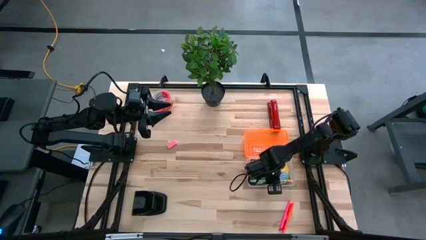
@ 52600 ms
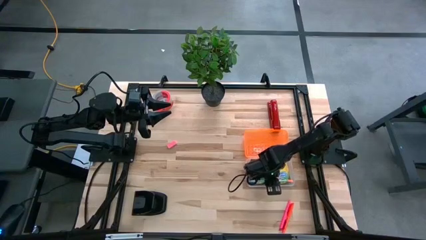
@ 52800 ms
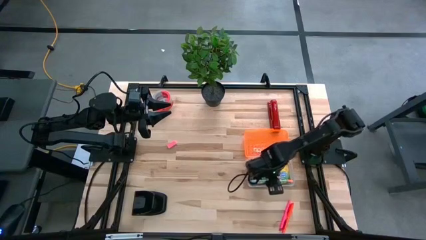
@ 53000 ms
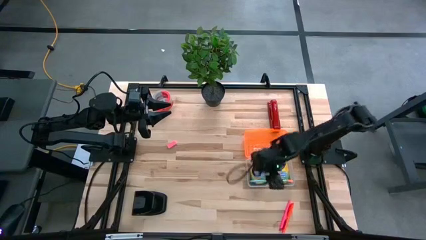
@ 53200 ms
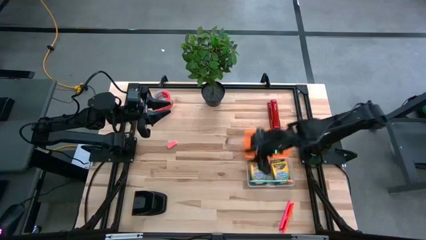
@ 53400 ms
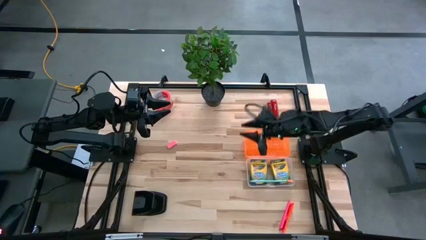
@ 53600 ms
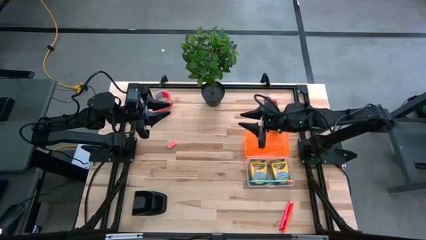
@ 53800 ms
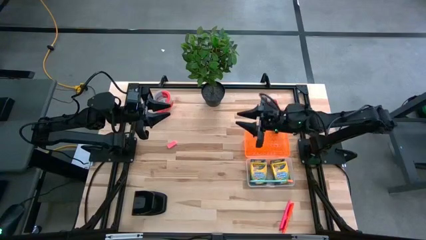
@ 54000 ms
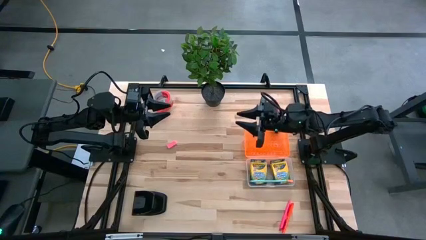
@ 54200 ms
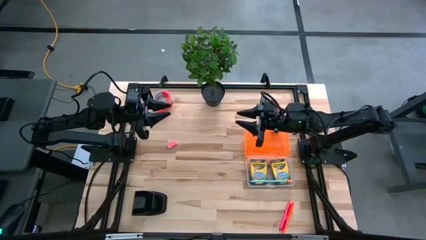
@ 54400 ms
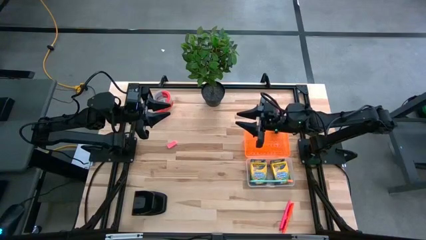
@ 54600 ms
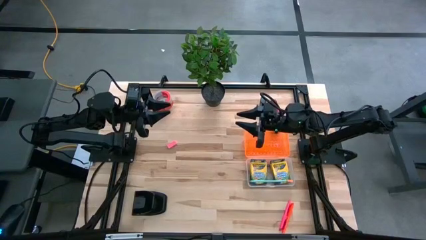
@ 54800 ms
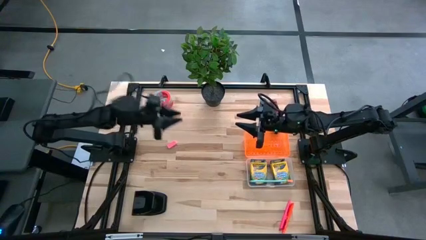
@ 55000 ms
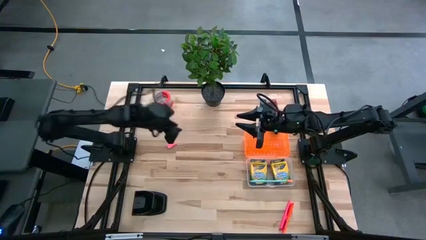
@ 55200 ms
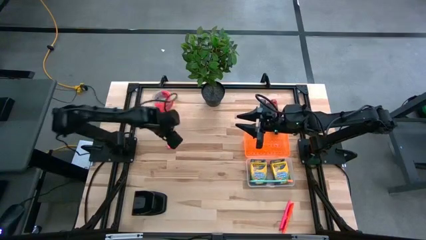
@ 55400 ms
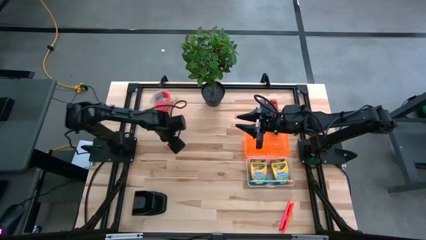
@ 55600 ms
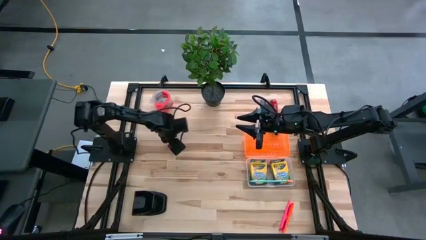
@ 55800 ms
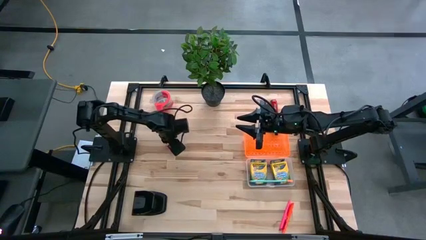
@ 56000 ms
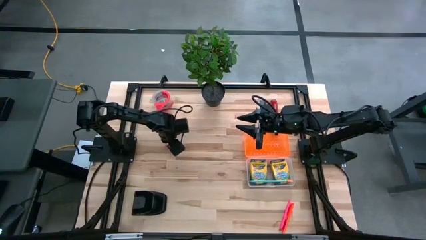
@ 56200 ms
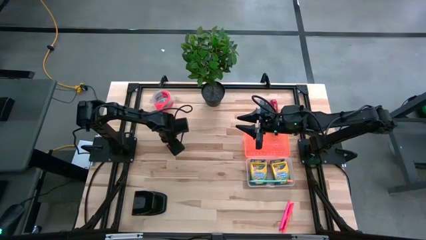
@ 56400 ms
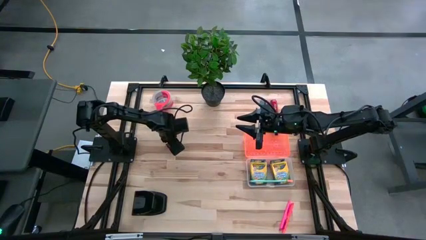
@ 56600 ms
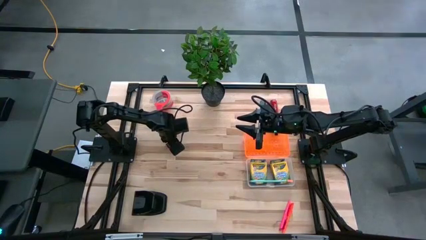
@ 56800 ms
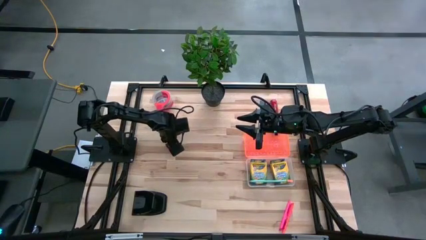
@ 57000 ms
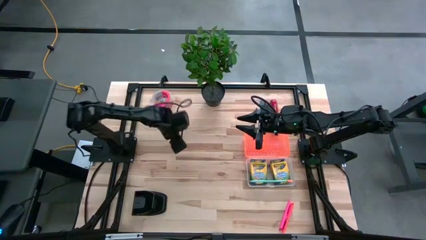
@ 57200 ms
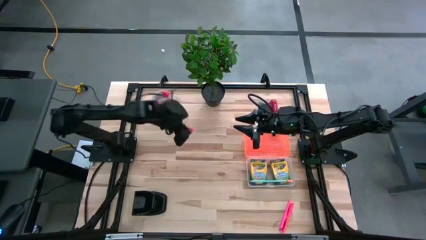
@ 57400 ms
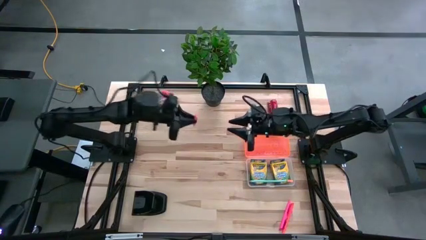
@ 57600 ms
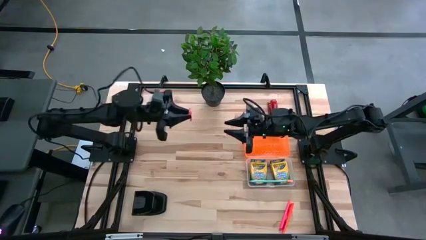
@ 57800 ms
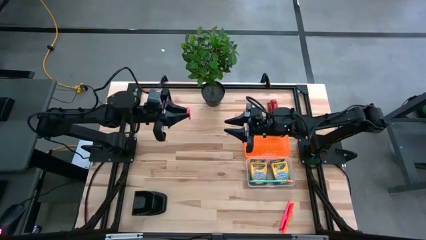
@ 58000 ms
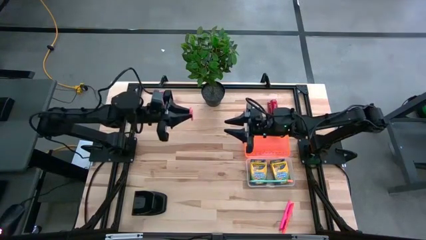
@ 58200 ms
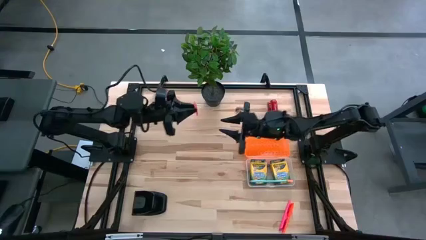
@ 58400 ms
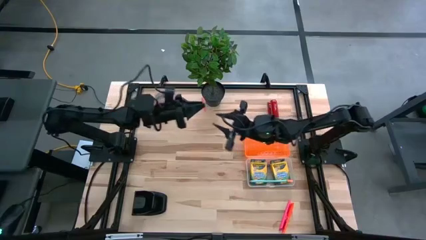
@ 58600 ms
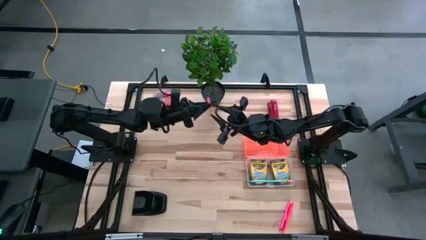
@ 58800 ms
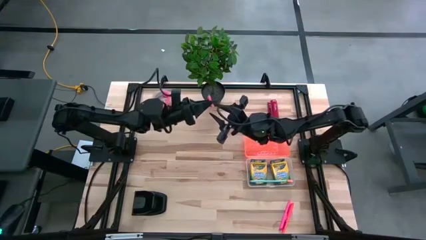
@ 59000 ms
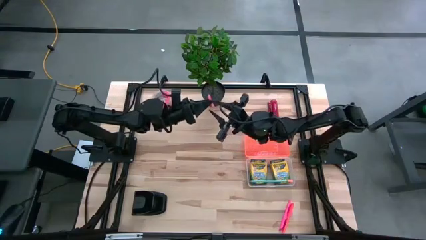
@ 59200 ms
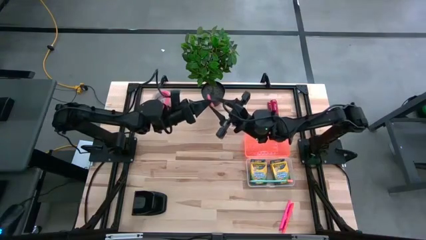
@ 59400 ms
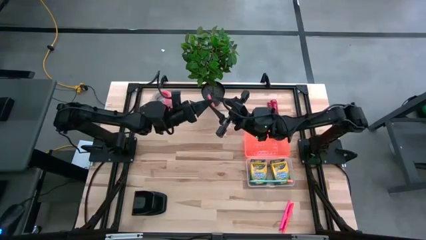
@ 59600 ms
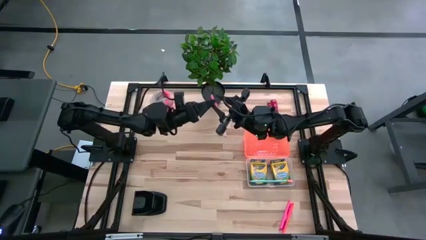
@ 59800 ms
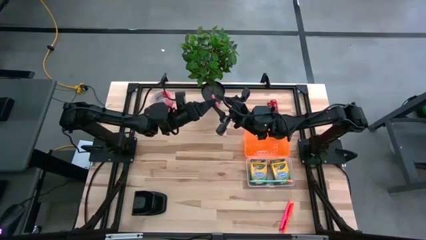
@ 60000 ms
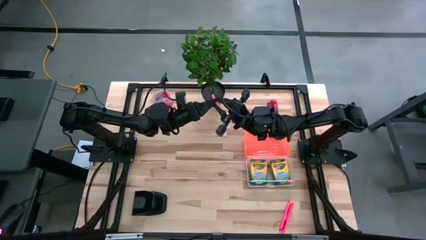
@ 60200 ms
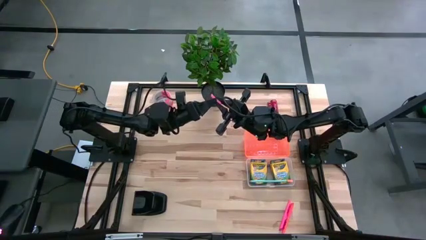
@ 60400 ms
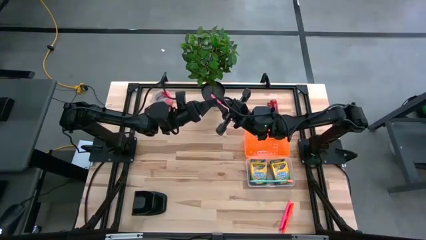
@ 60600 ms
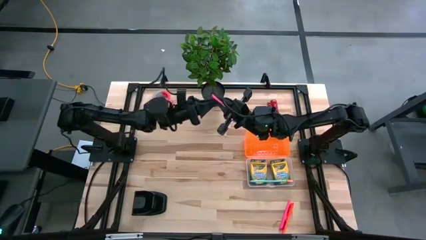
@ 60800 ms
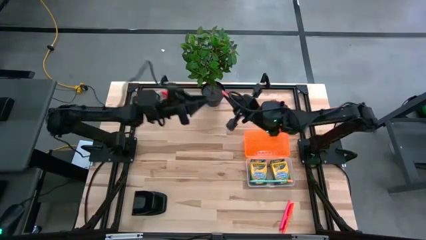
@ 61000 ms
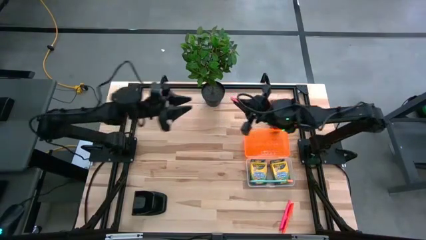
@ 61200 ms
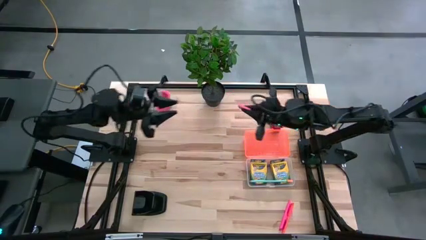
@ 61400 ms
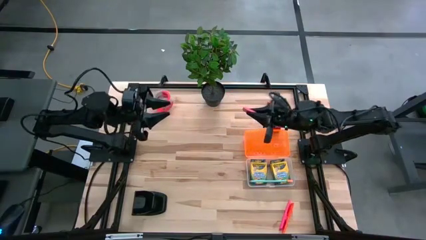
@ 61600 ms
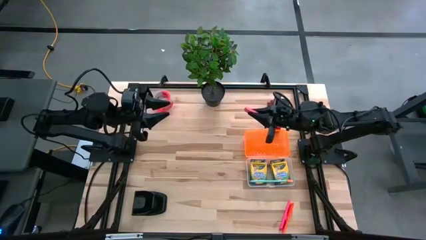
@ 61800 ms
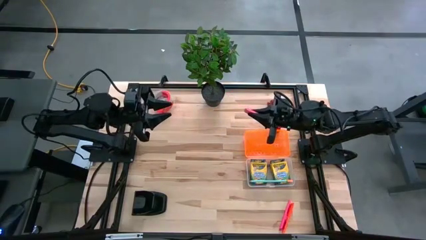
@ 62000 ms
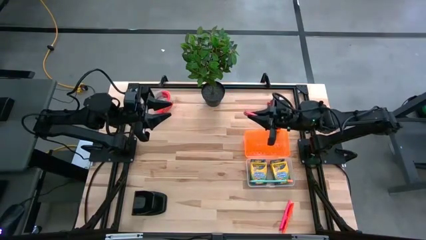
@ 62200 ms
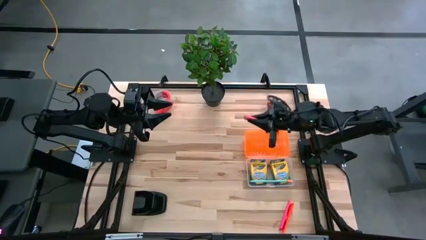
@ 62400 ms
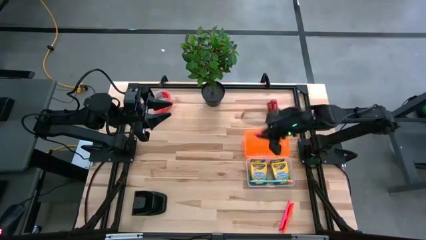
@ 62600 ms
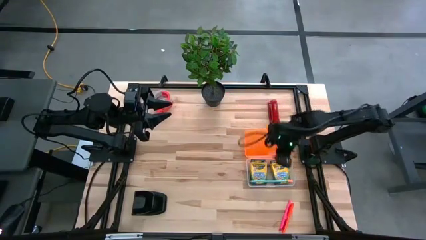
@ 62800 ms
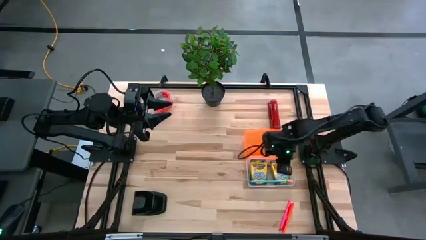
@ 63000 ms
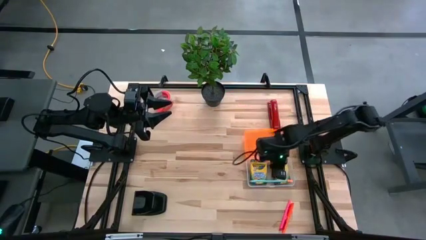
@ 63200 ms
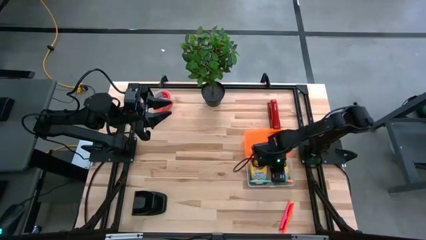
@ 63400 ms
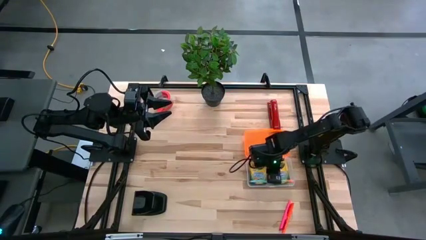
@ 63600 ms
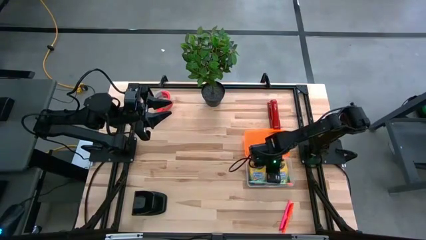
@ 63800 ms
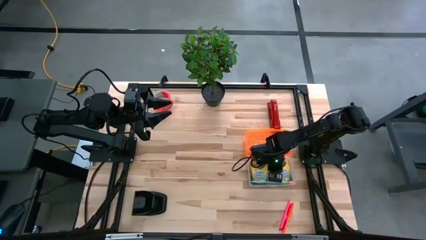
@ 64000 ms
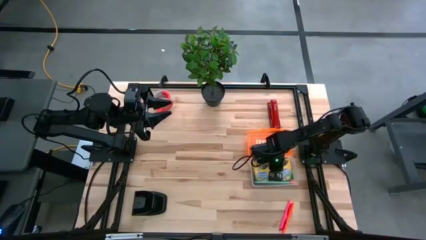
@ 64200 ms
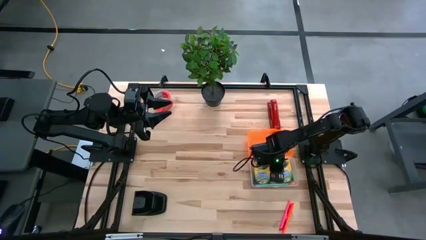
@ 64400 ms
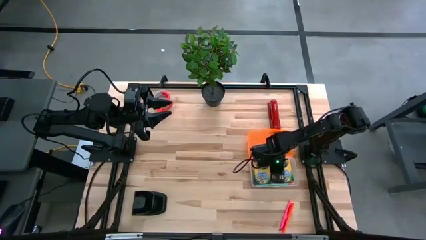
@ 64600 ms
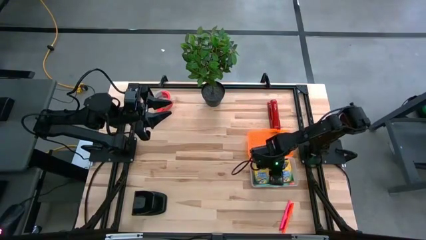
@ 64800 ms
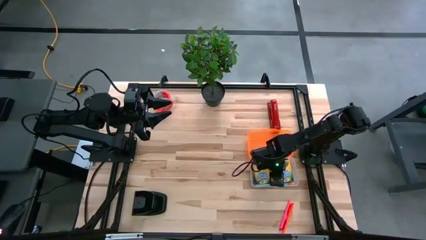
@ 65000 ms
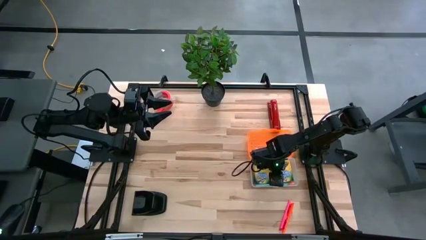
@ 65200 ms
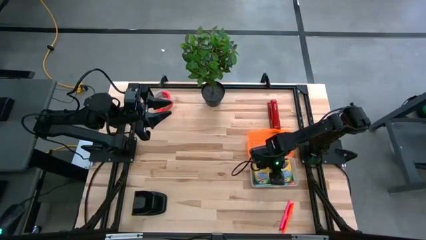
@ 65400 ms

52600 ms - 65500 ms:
Task: Pack school essentials
Put the pink eraser into the orange supply box

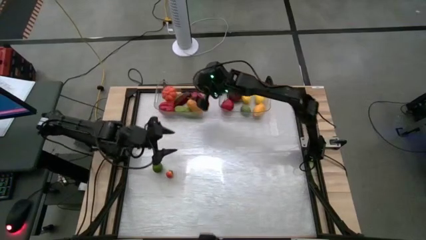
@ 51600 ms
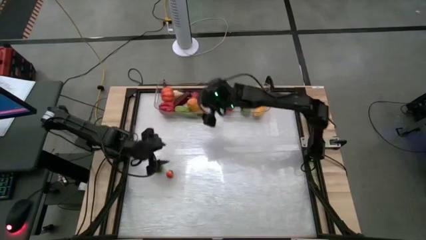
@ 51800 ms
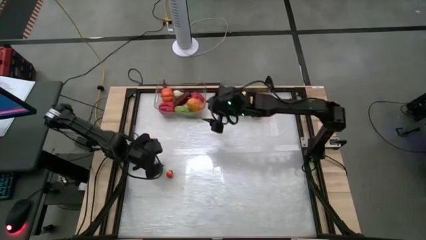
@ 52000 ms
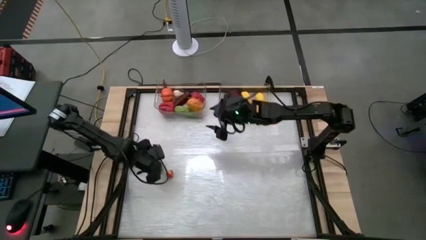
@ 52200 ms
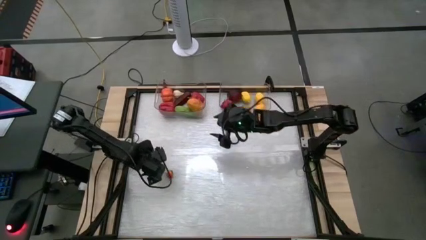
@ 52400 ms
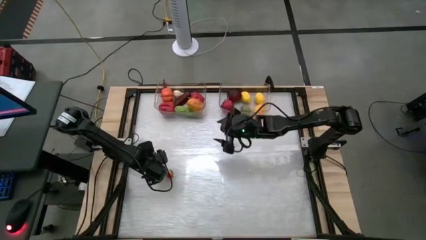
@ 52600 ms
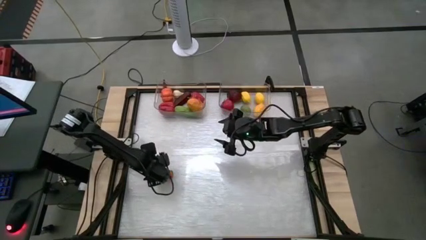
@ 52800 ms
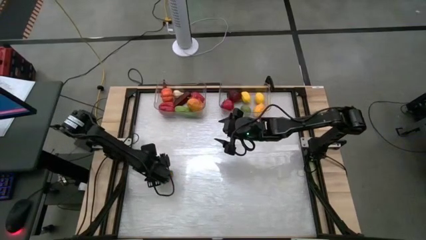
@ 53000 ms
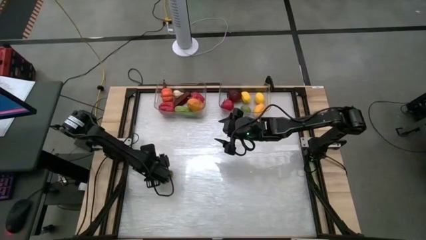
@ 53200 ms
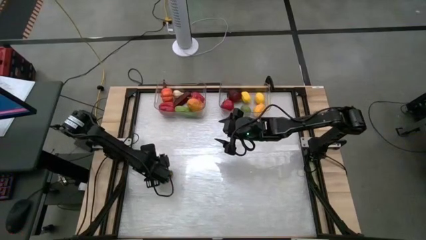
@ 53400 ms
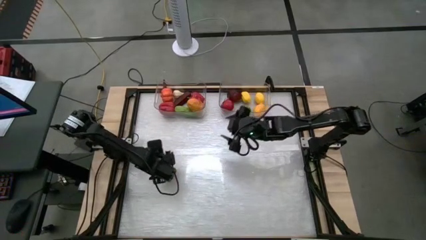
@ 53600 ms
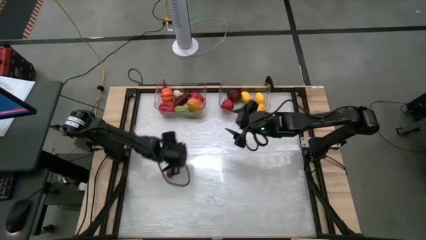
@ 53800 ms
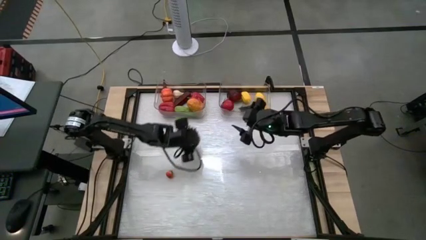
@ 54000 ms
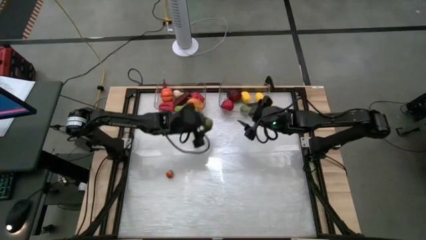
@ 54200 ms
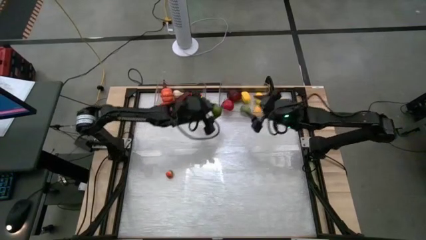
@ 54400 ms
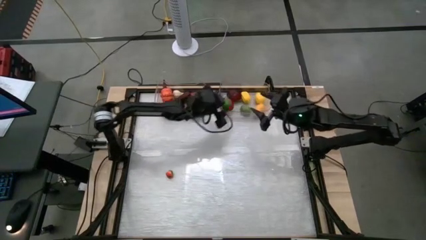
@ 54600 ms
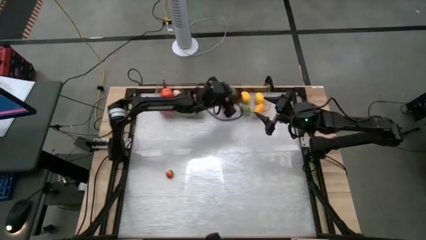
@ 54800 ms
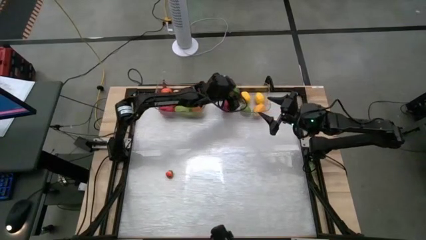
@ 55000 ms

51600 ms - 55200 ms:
Task: Sort produce into baskets
Put the lime in the container
